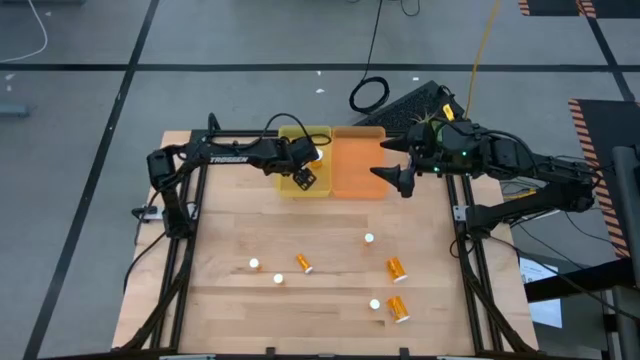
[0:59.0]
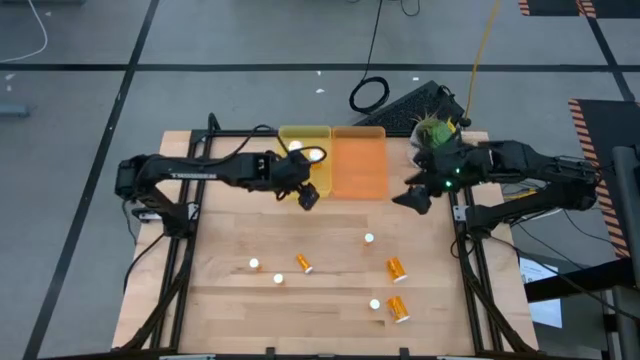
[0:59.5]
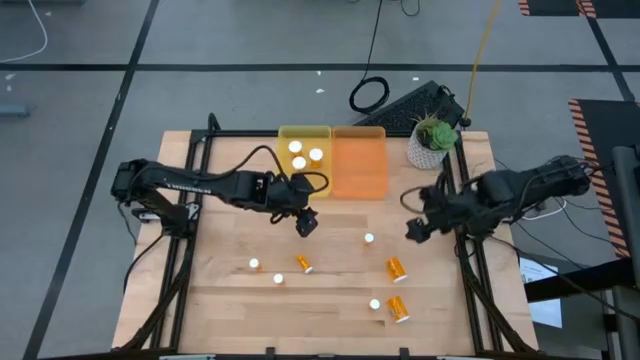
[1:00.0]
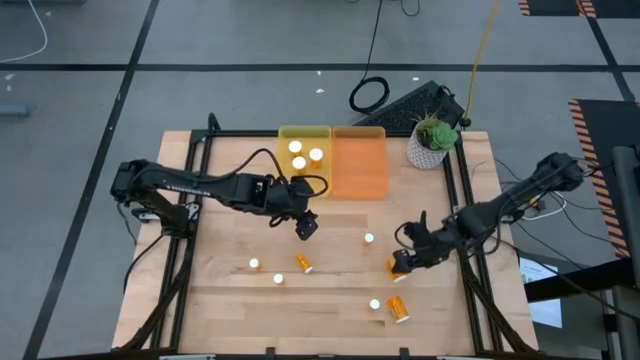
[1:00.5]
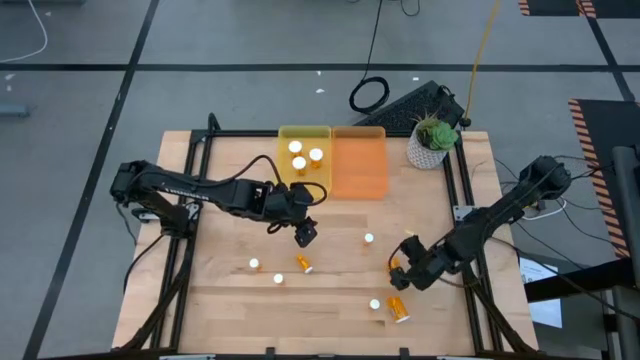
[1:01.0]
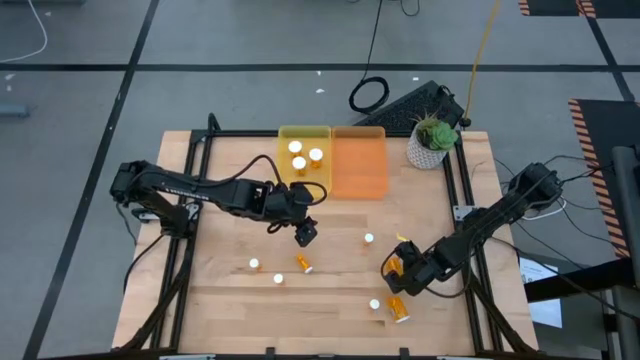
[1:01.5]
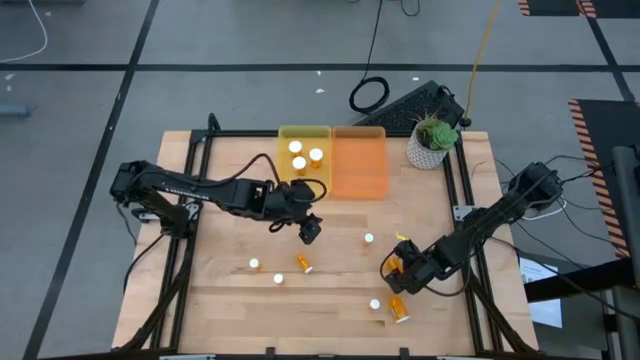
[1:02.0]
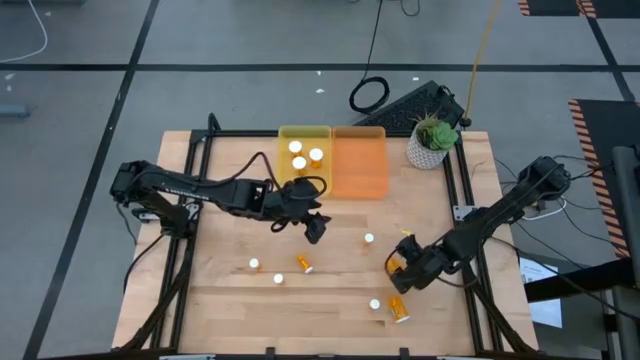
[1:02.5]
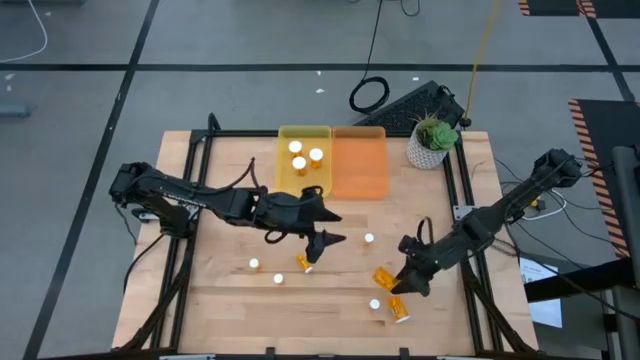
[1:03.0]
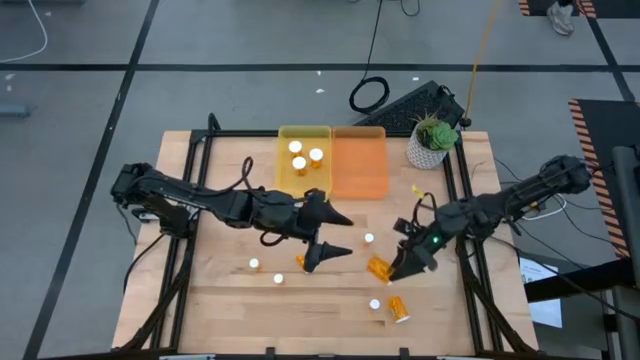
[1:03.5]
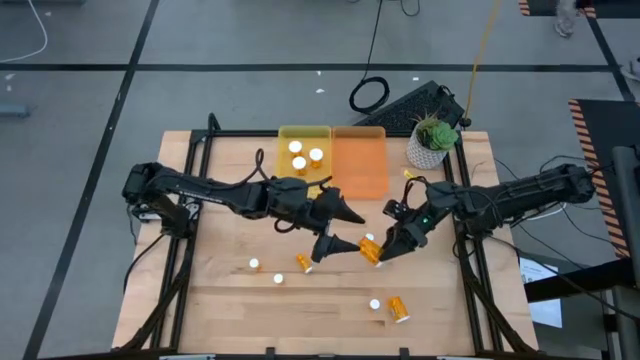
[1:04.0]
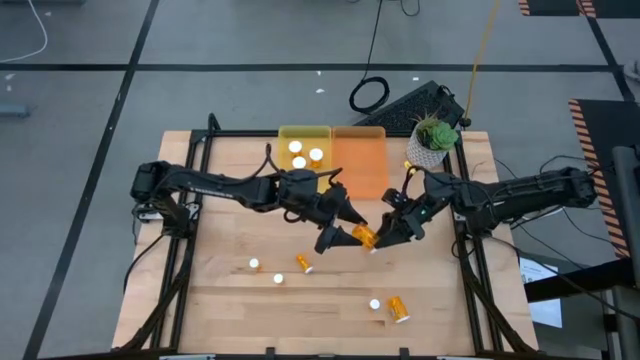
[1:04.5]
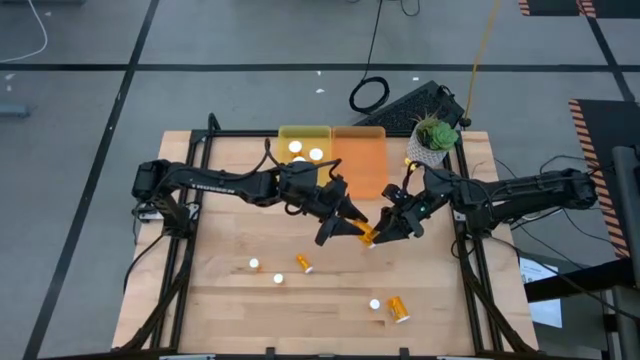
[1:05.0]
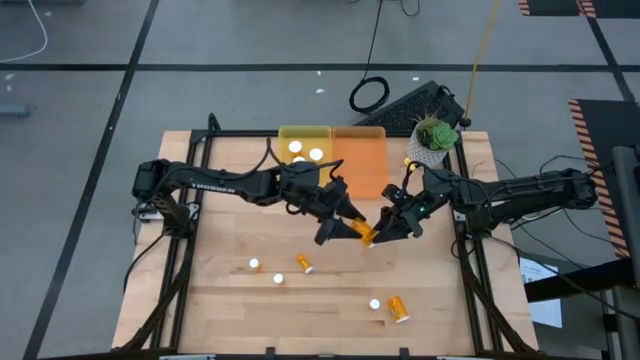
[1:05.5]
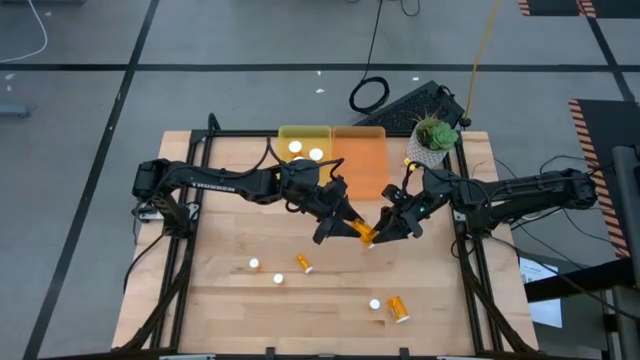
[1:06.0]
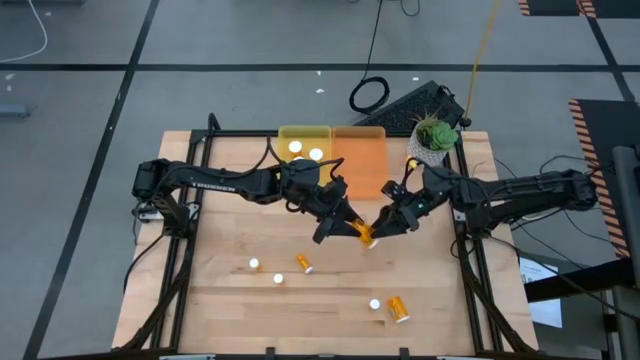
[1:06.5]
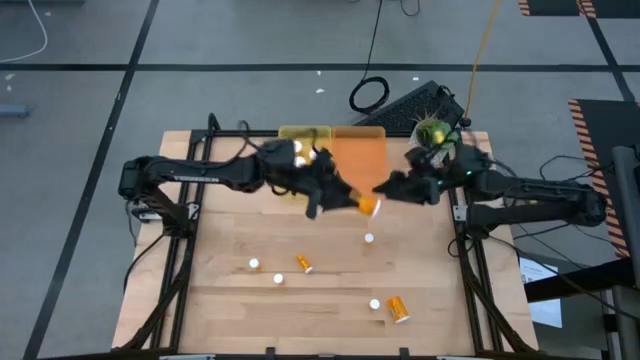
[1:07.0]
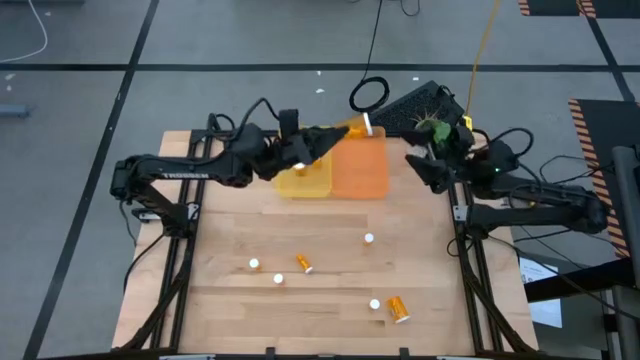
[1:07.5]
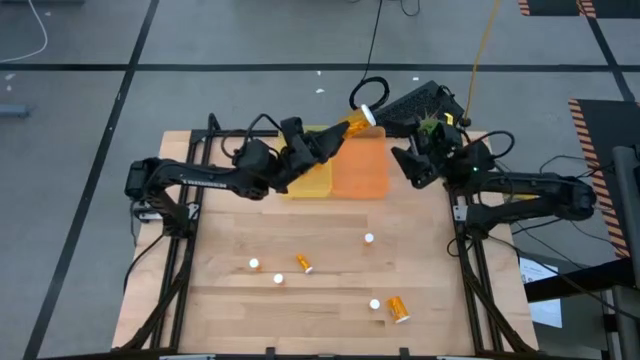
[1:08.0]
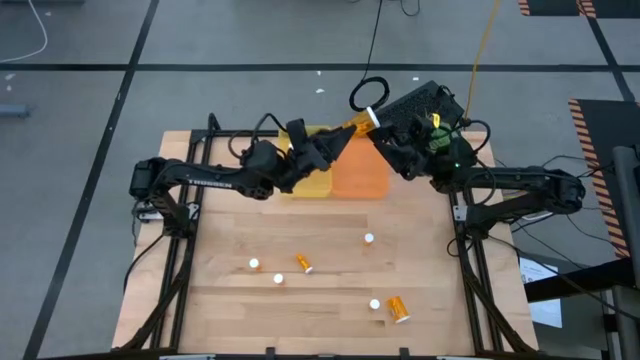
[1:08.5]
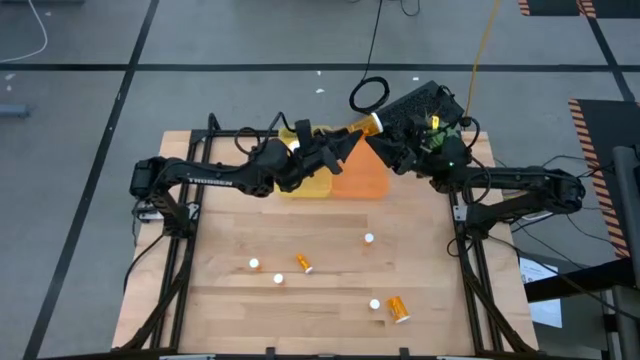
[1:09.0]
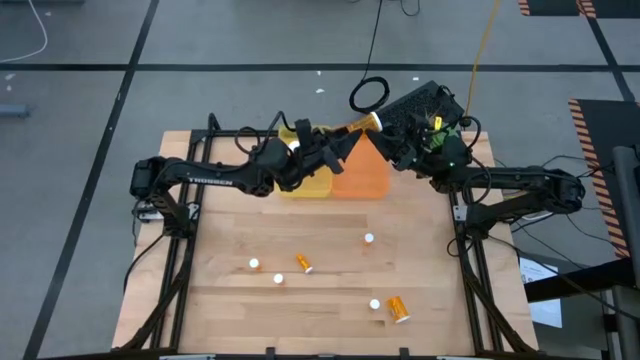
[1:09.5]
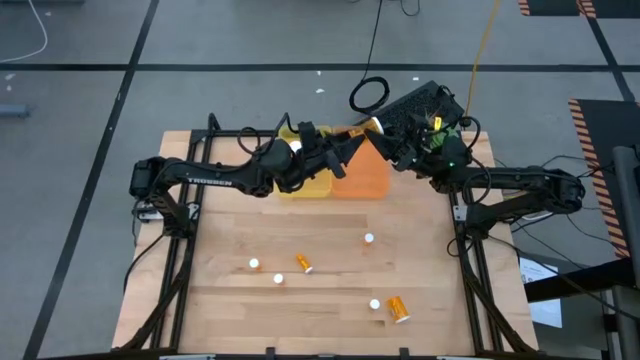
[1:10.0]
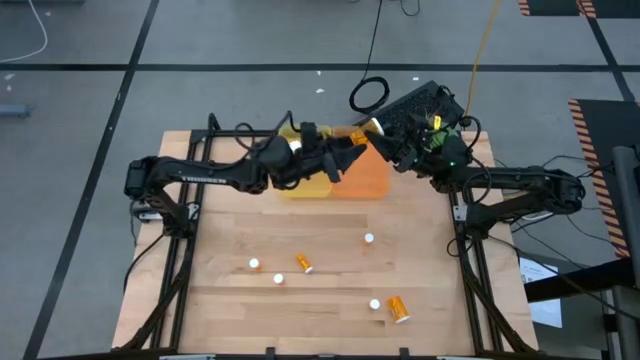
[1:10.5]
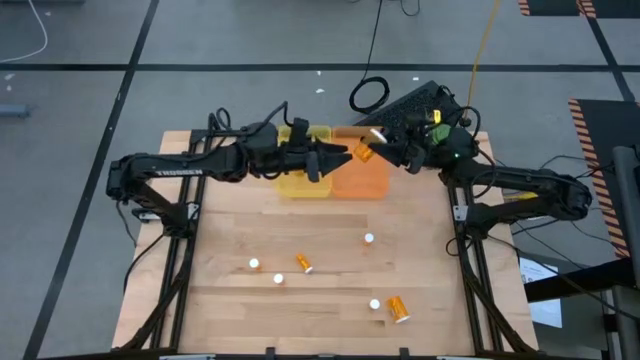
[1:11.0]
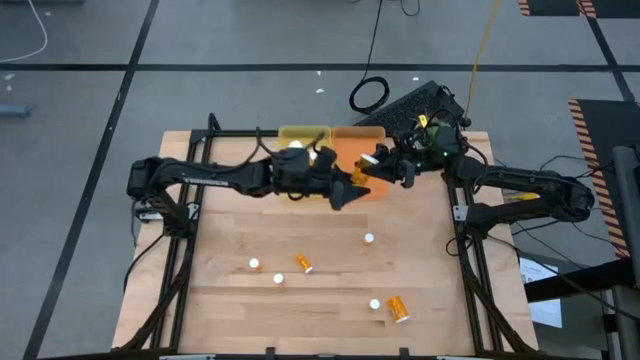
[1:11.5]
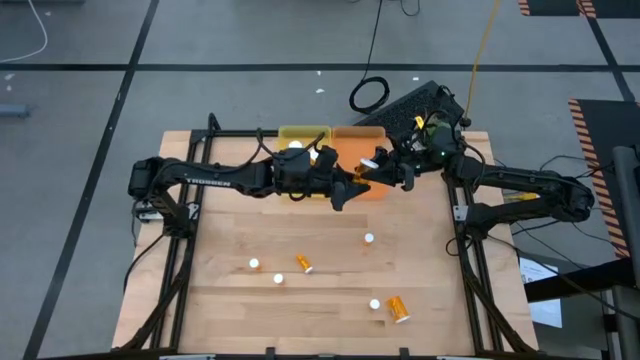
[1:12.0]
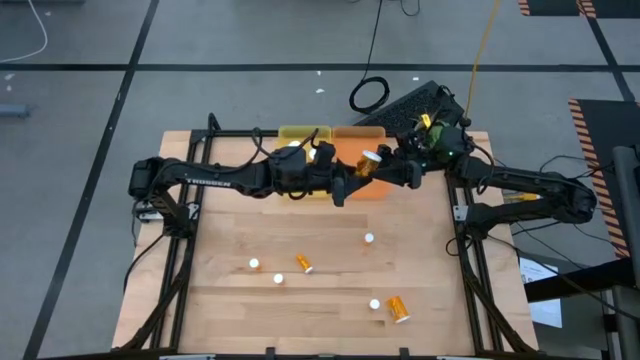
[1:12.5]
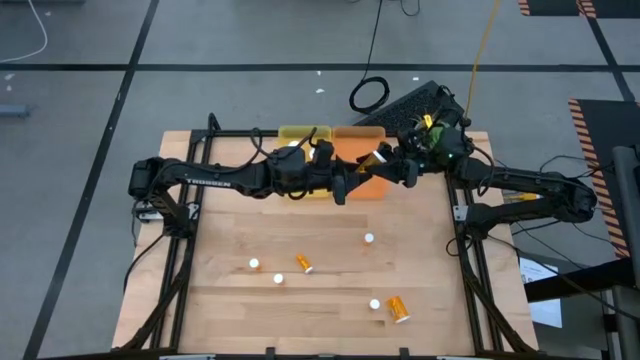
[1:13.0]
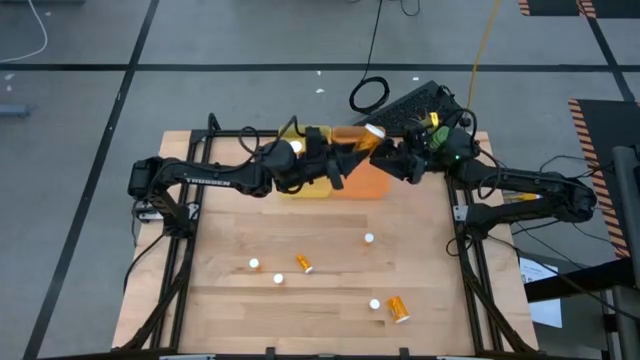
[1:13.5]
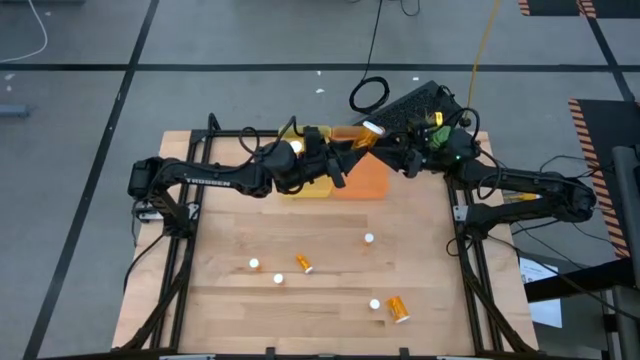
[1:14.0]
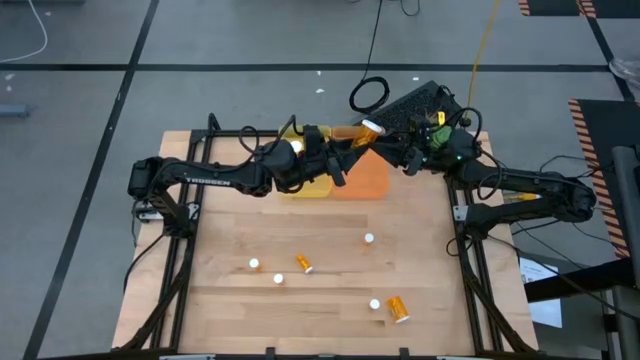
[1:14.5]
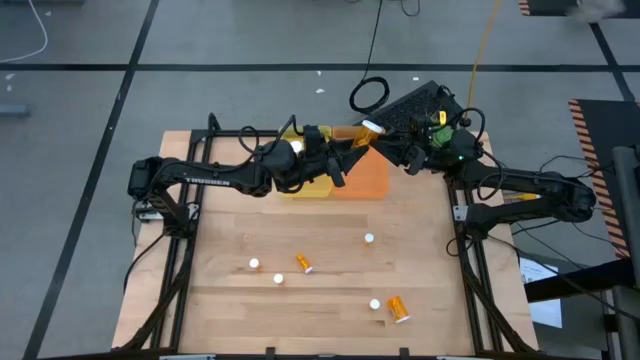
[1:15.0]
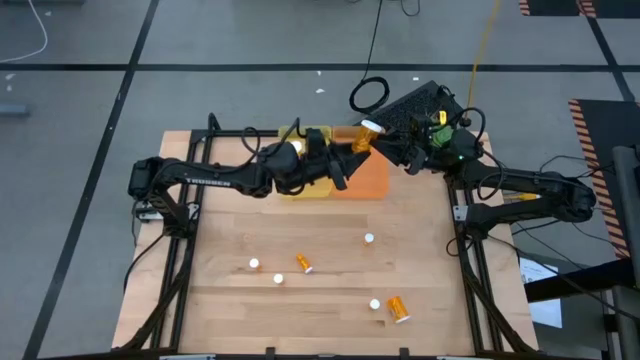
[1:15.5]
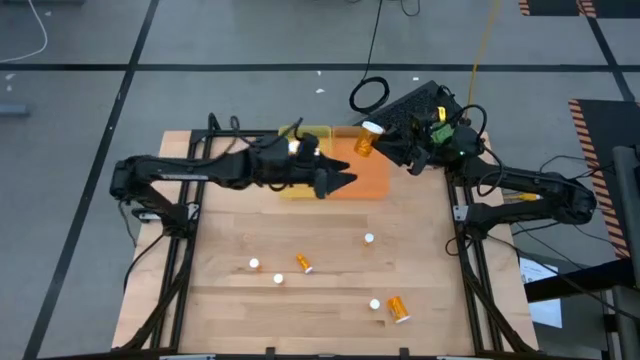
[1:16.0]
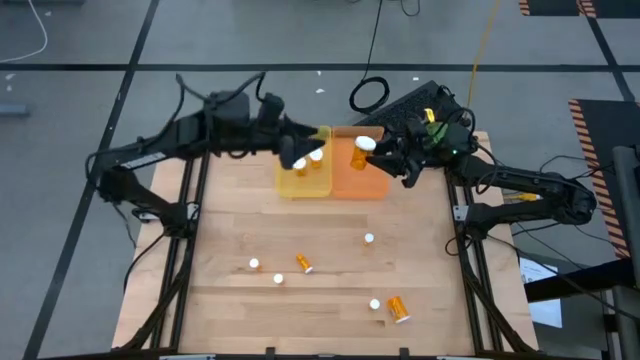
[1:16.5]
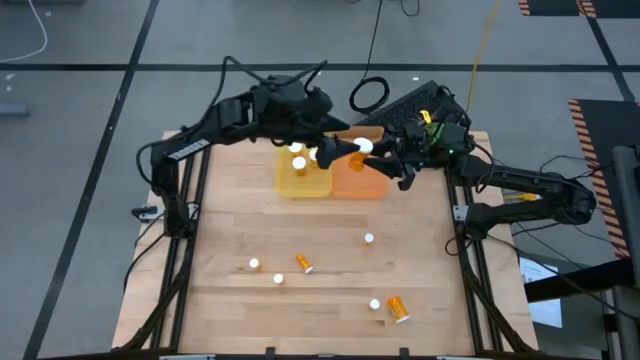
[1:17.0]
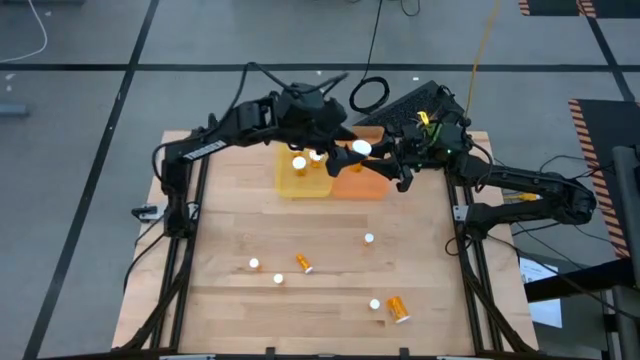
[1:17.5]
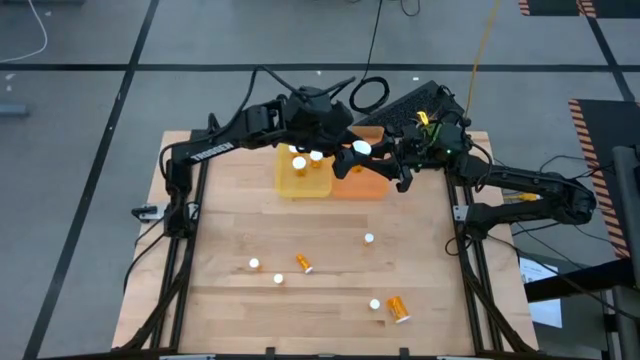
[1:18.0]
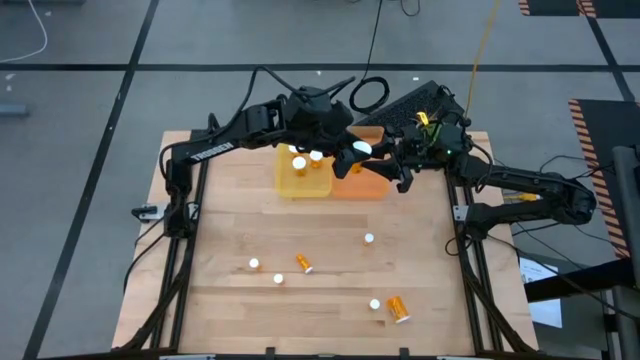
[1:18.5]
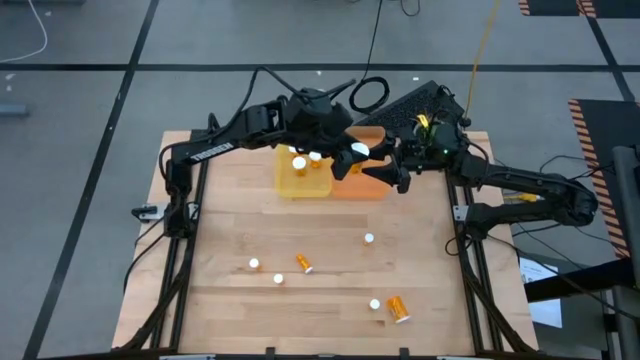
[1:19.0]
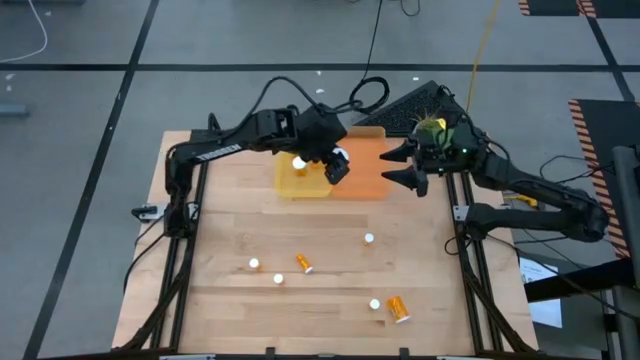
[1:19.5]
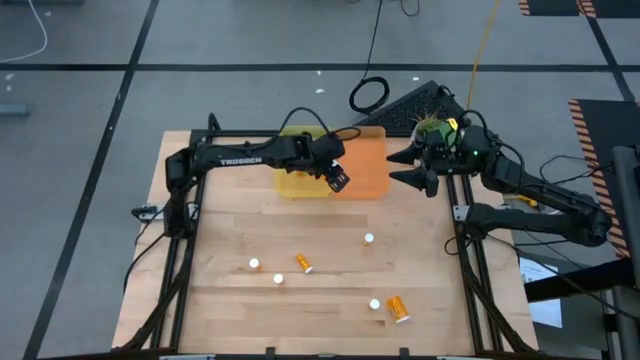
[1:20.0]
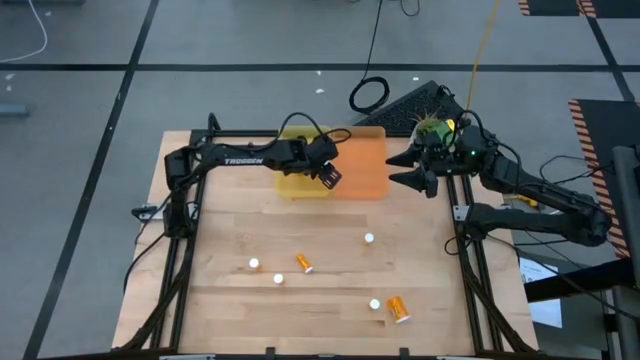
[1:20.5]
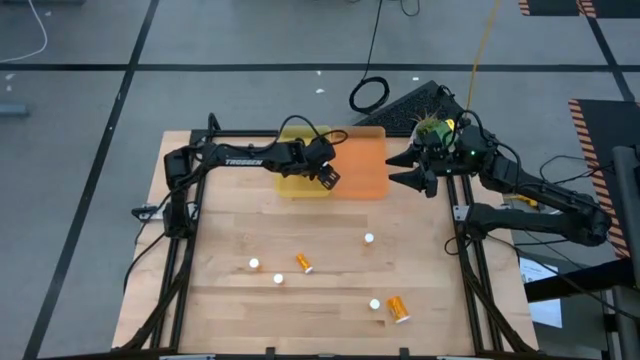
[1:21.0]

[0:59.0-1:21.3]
Task: Pick and place medicine bottles into bin by pill shape (circle, oval)
Put the large orange capsule bottle into the yellow bin
